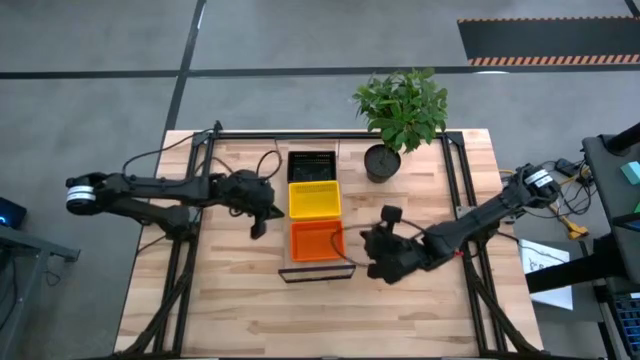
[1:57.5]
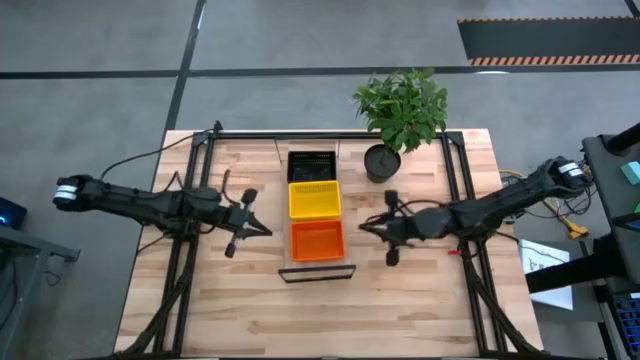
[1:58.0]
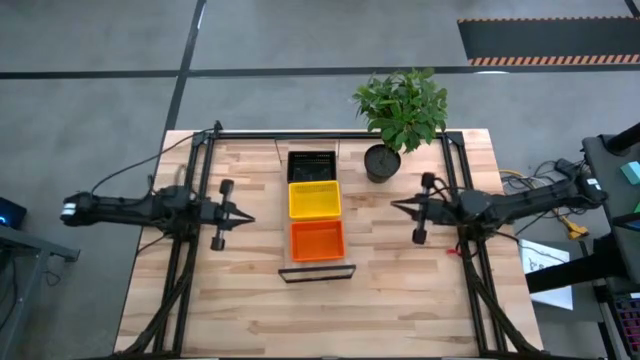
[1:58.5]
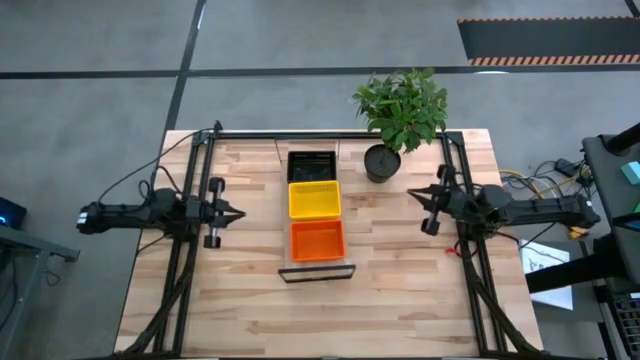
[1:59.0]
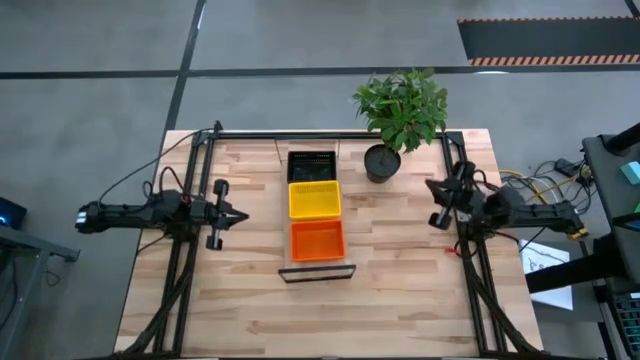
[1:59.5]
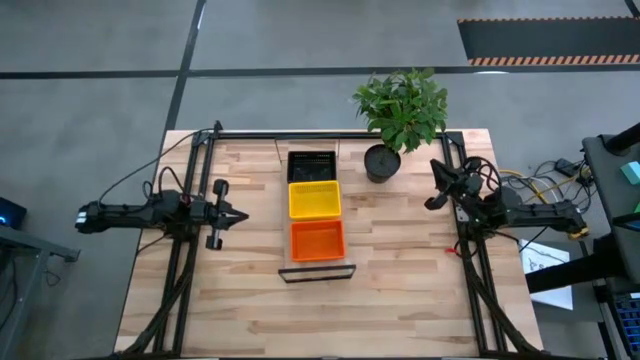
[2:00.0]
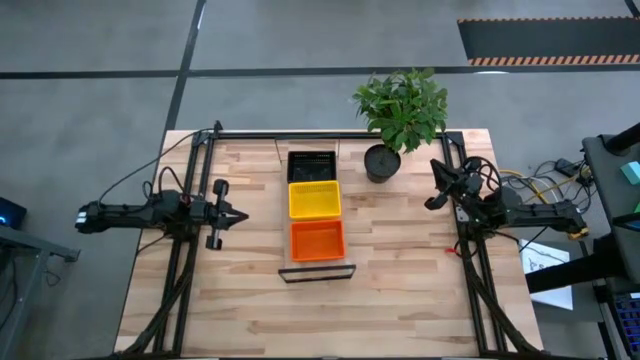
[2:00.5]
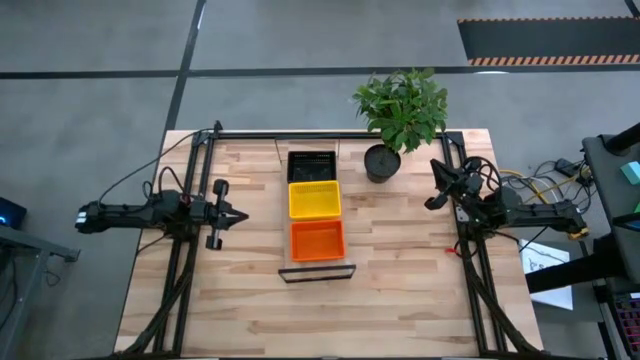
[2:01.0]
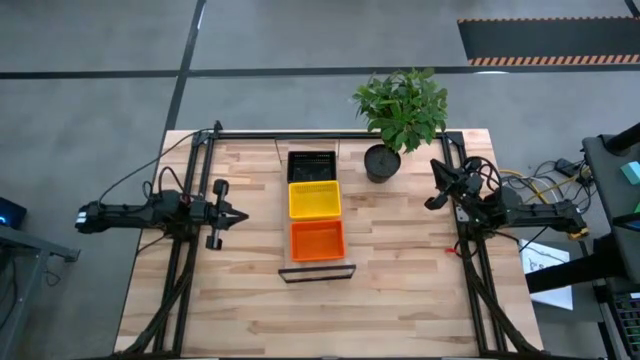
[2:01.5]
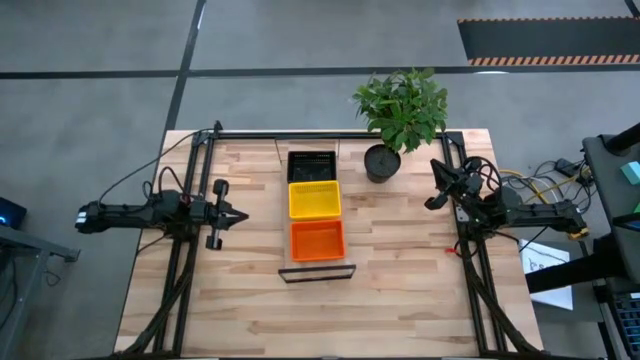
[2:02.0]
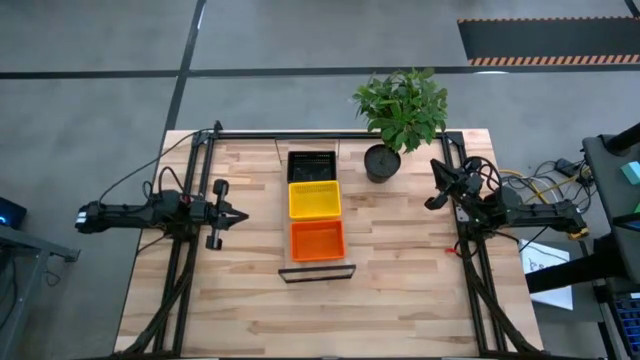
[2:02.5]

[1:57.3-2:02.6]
Task: Stack baskets on shelf by color
Return to Home Position

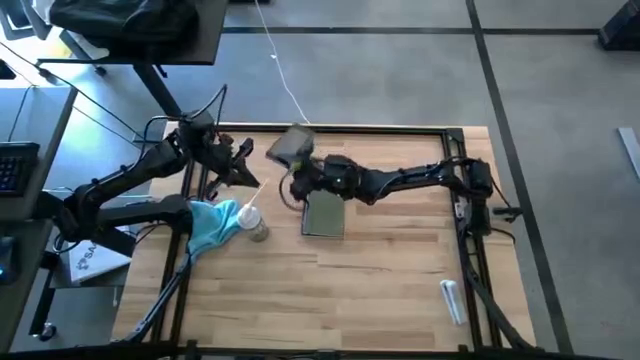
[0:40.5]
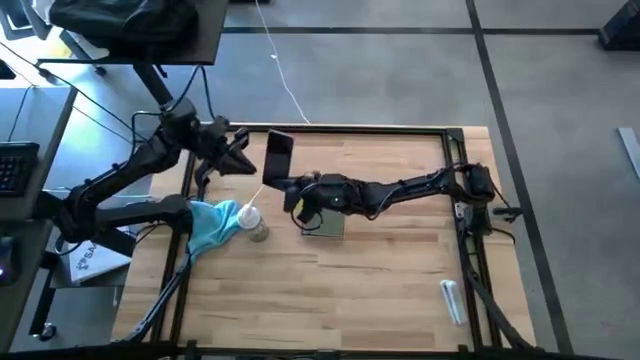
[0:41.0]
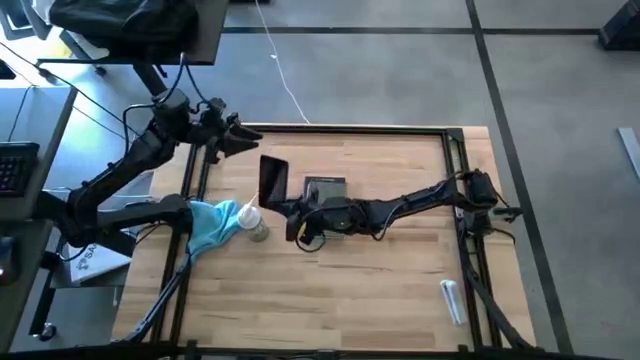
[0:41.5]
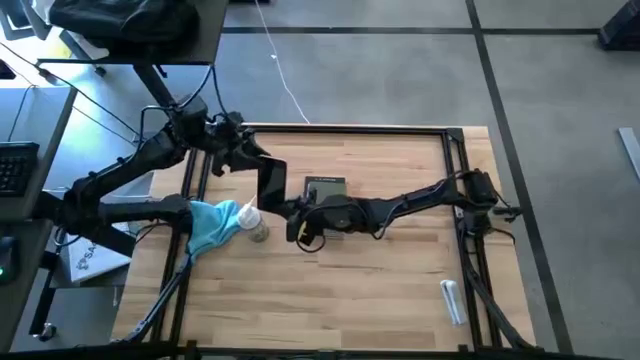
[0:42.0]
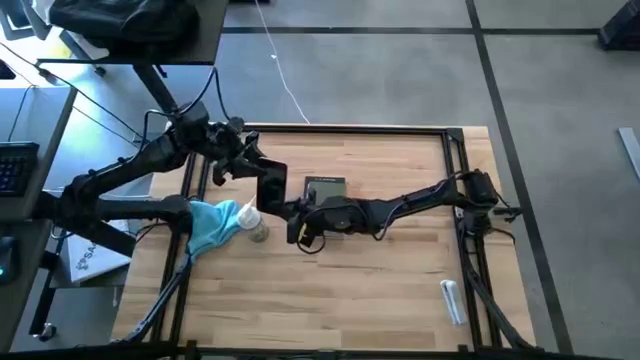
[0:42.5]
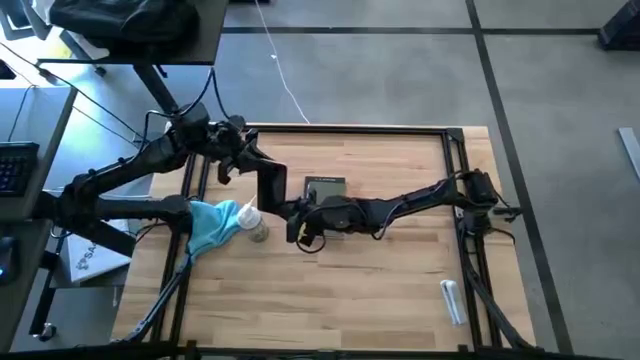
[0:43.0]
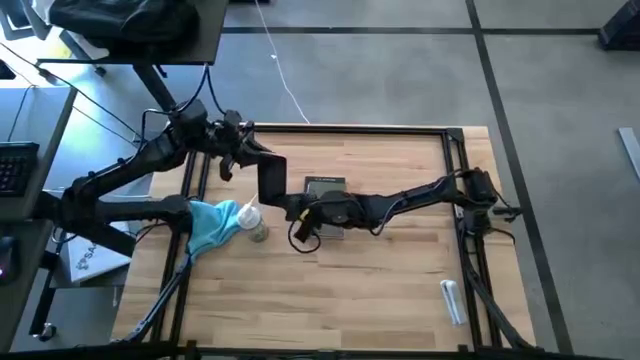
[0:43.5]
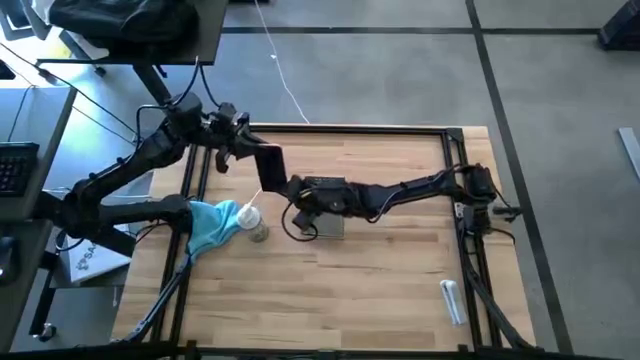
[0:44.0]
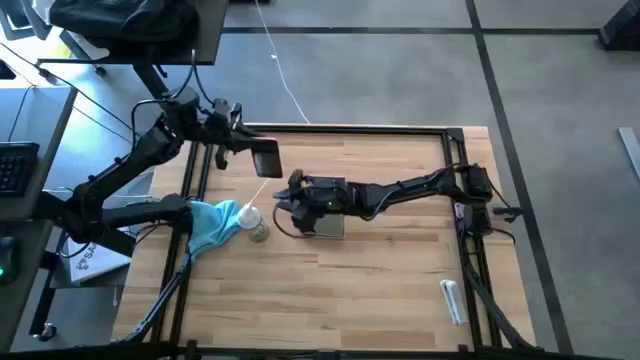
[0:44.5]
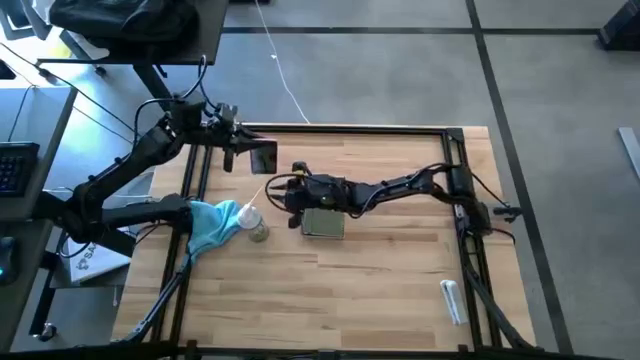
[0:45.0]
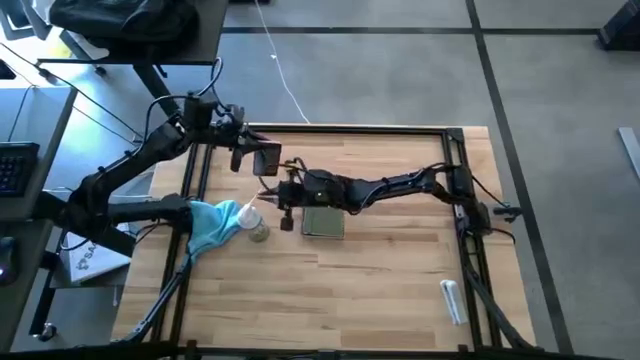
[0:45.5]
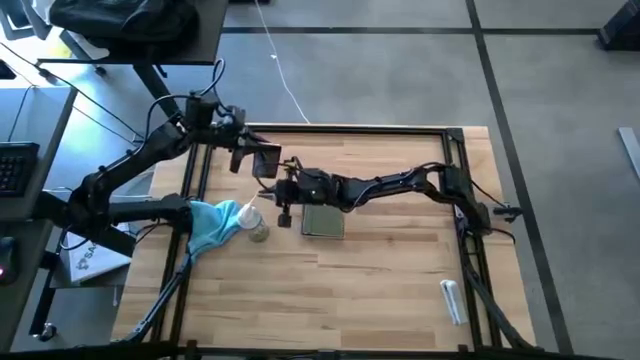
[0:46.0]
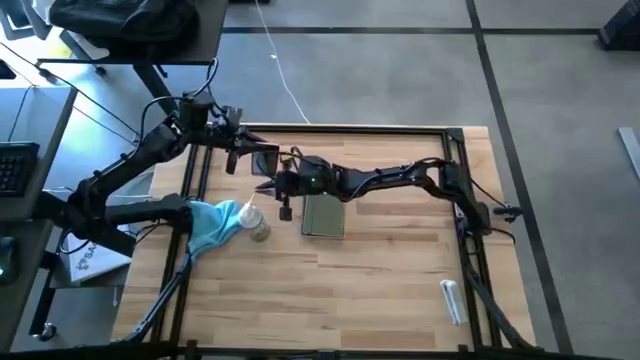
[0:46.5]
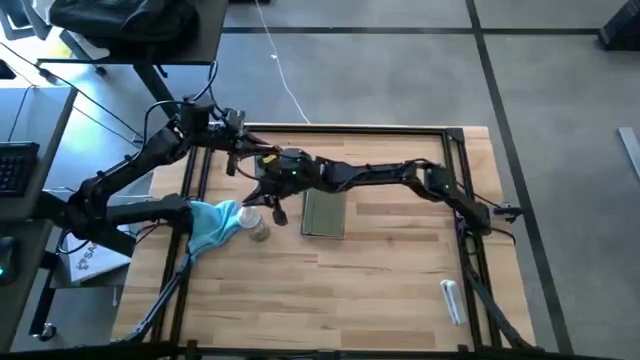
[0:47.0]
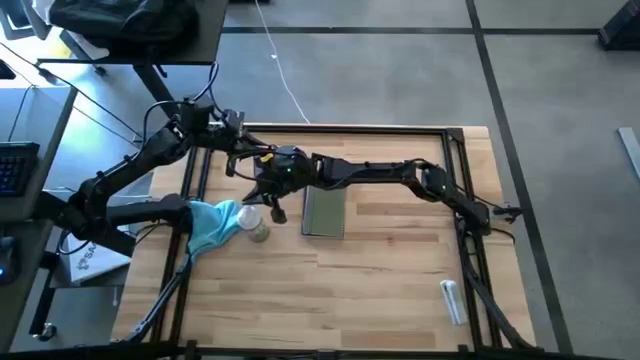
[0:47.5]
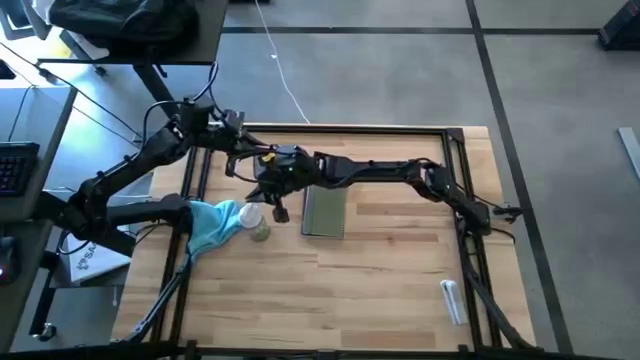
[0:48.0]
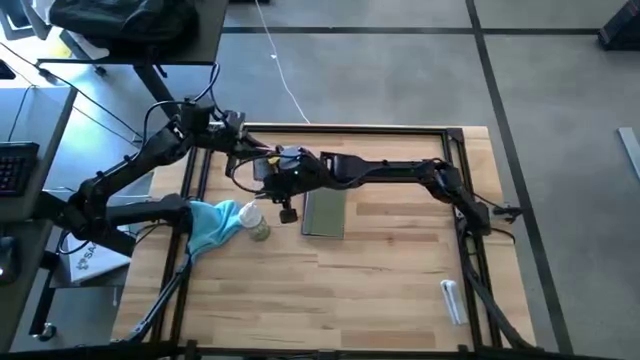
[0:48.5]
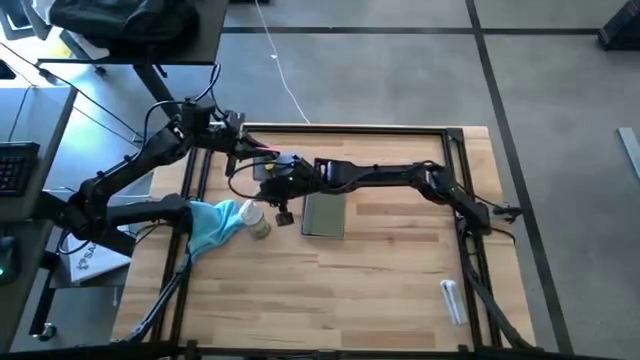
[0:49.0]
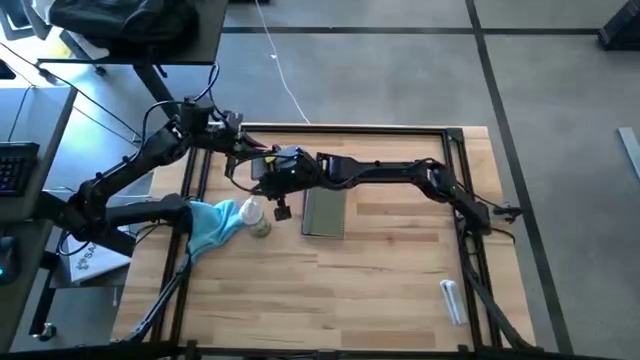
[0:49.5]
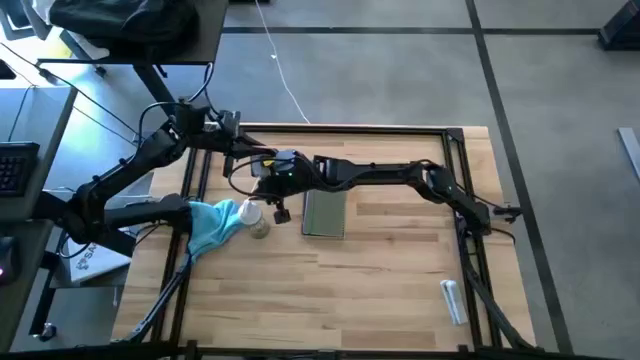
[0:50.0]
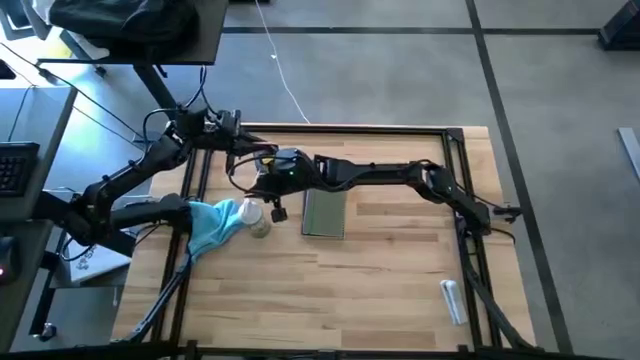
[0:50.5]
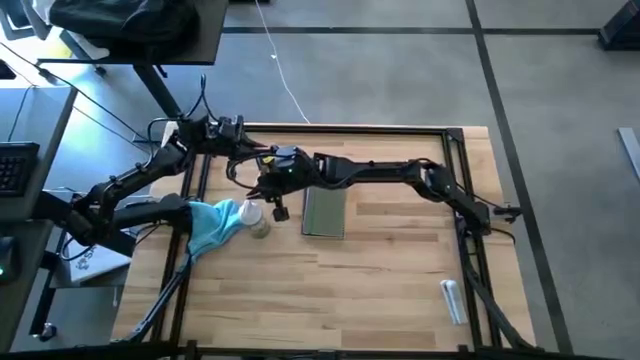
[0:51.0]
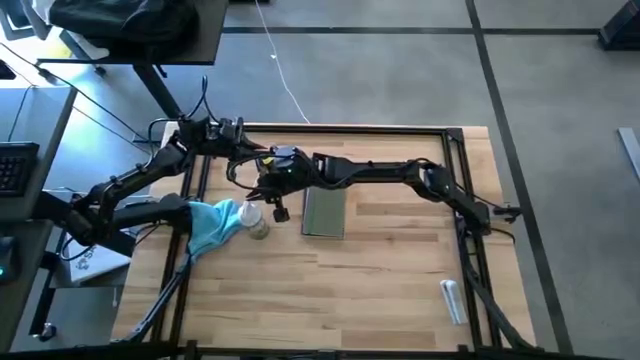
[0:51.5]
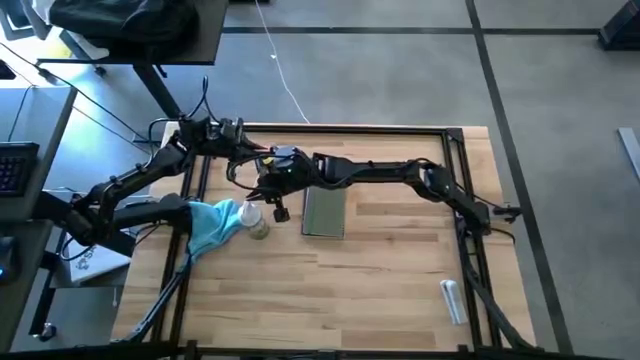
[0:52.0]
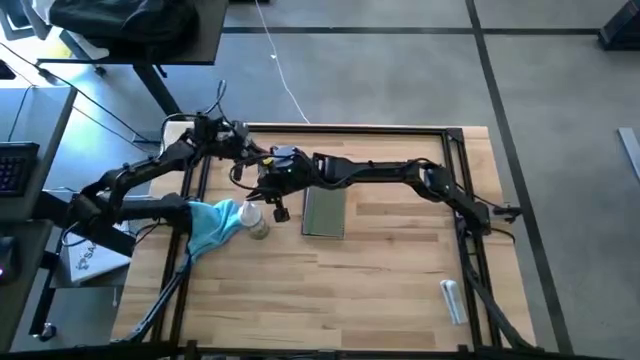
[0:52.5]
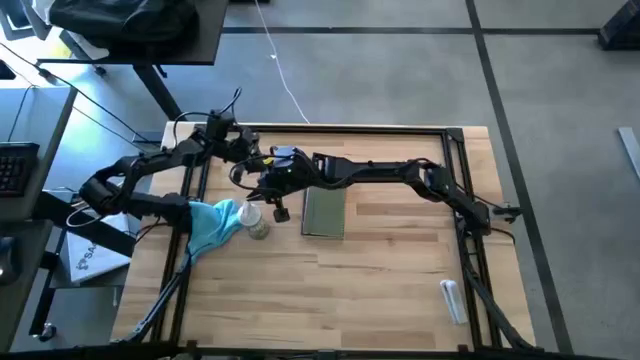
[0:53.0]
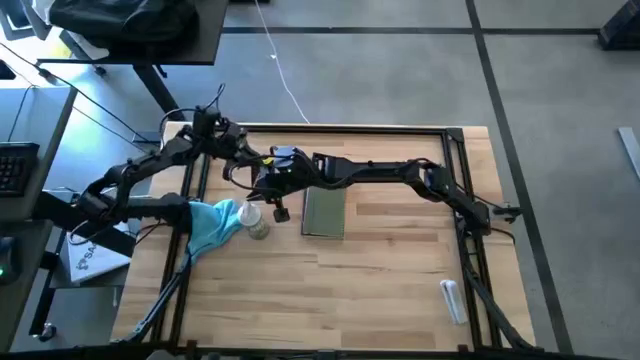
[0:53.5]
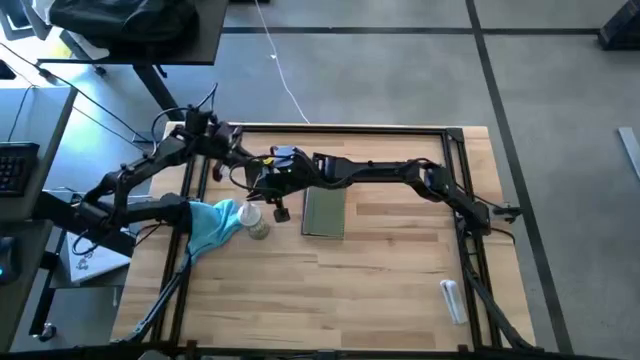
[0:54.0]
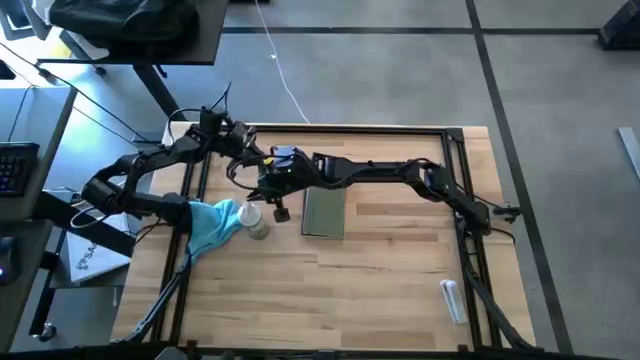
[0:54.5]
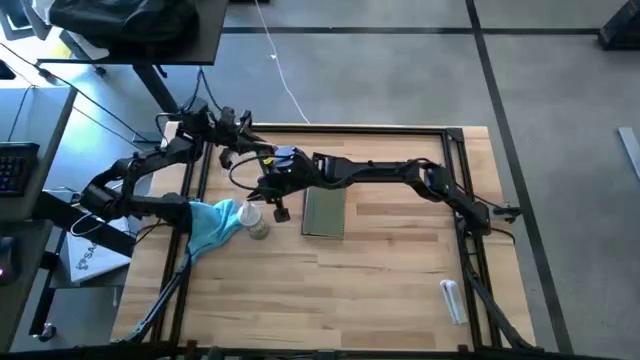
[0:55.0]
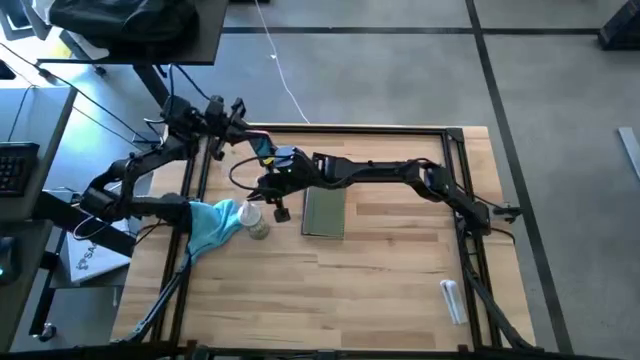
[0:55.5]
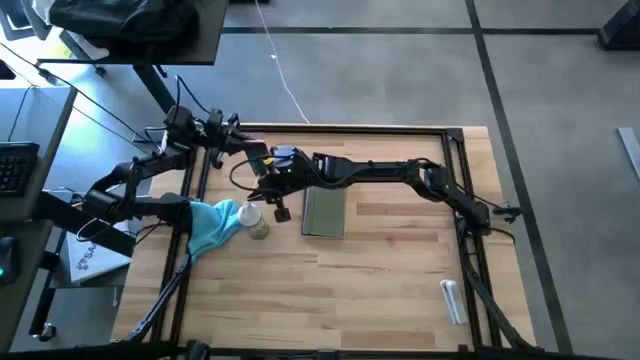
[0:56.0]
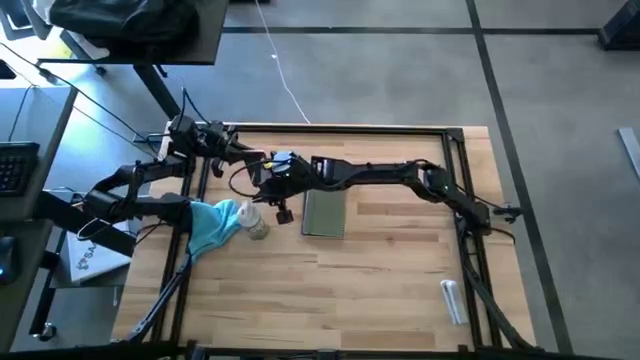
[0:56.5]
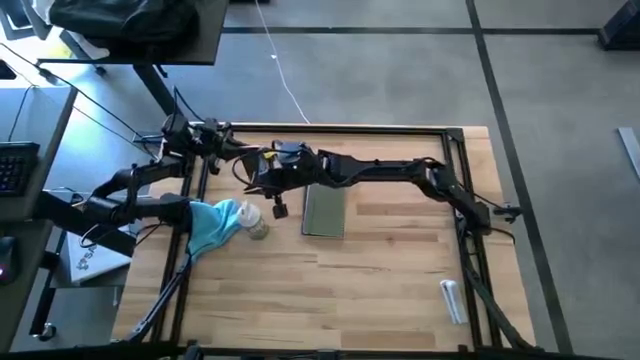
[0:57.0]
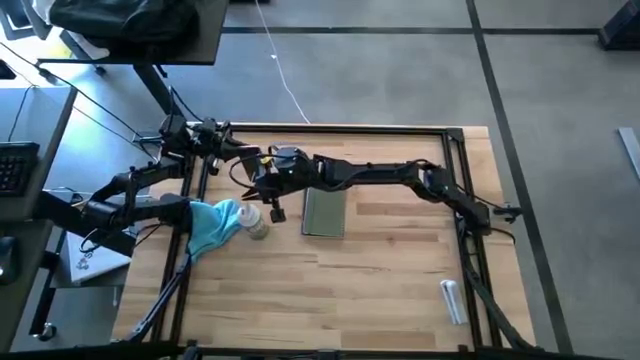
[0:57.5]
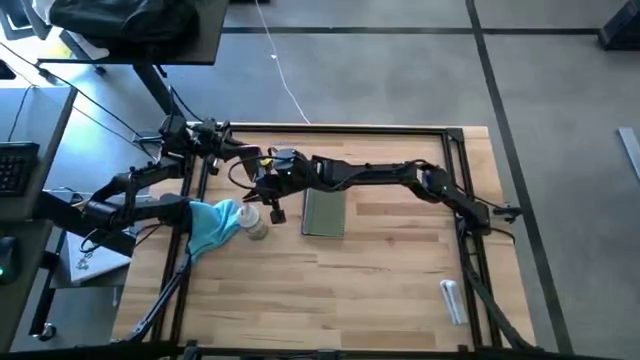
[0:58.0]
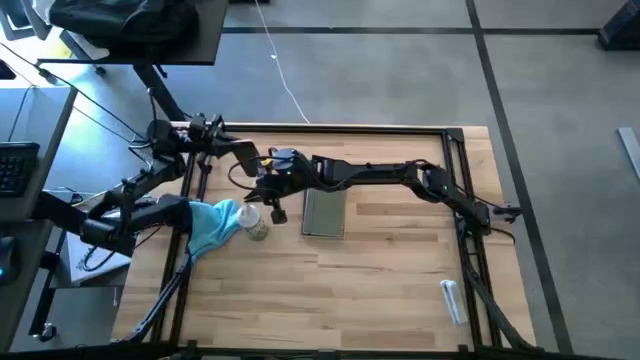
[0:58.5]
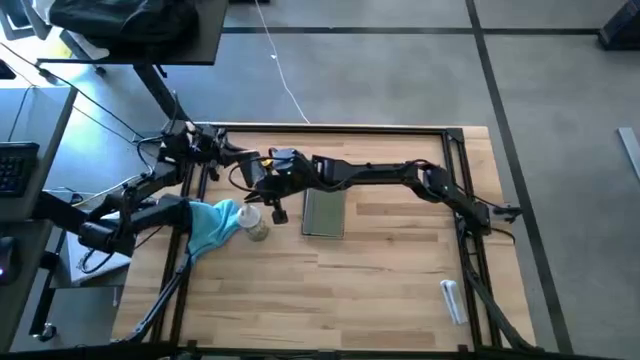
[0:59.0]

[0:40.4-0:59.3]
Task: Apply microfiber cloth
Spray the cellphone using the spray bottle
